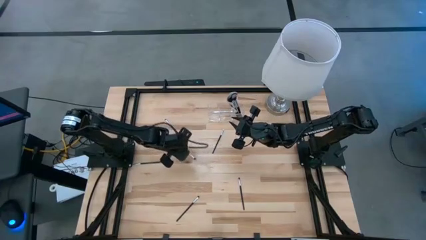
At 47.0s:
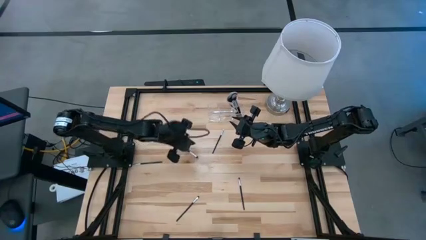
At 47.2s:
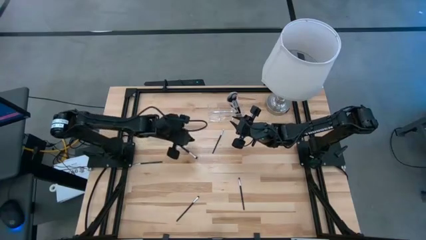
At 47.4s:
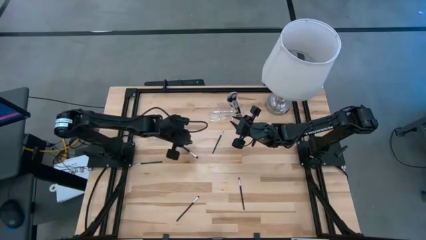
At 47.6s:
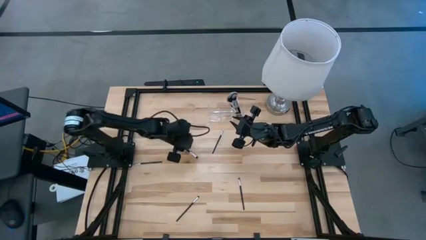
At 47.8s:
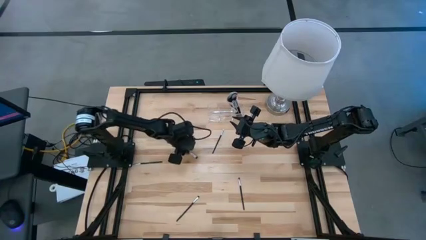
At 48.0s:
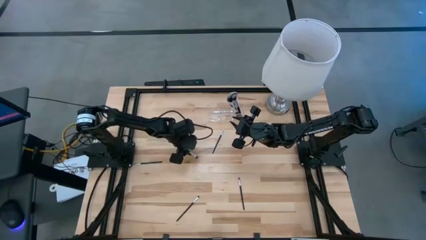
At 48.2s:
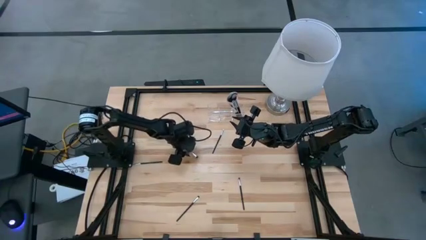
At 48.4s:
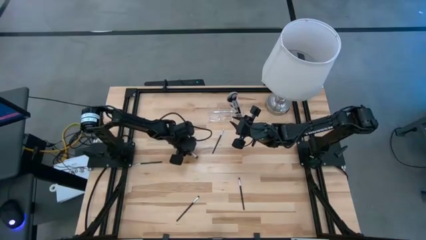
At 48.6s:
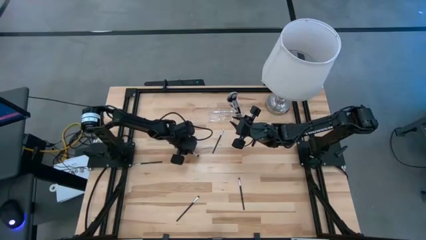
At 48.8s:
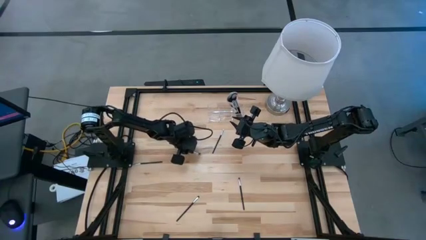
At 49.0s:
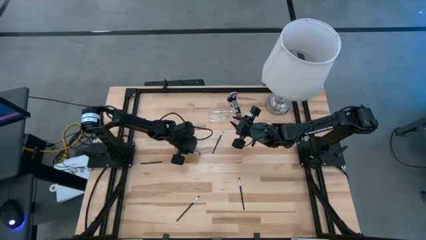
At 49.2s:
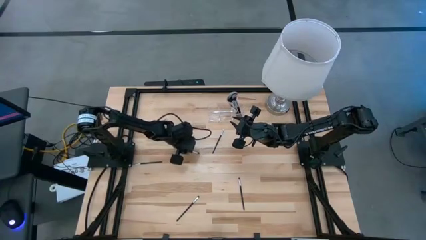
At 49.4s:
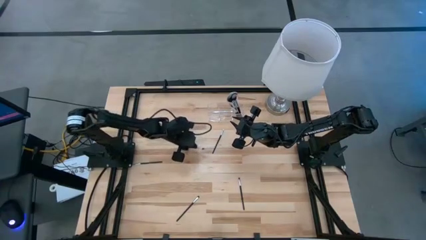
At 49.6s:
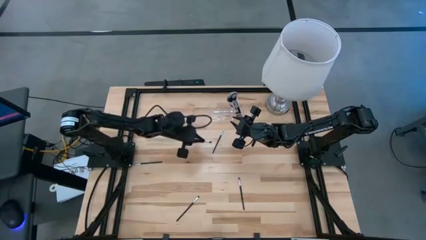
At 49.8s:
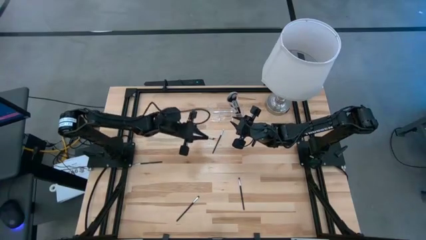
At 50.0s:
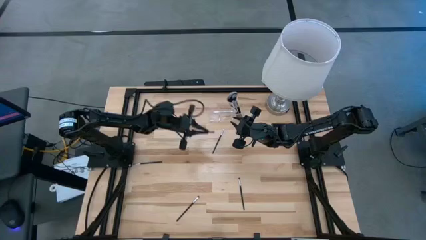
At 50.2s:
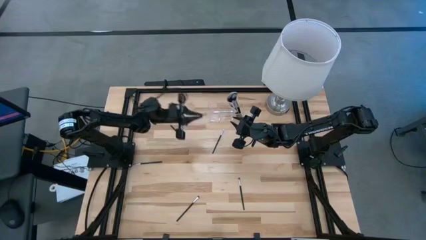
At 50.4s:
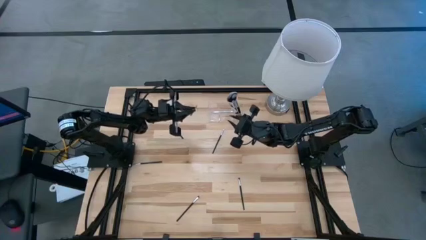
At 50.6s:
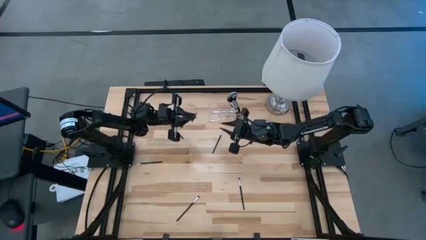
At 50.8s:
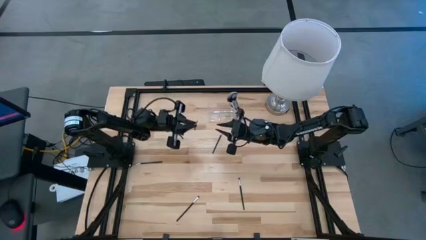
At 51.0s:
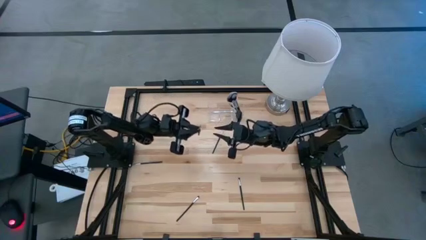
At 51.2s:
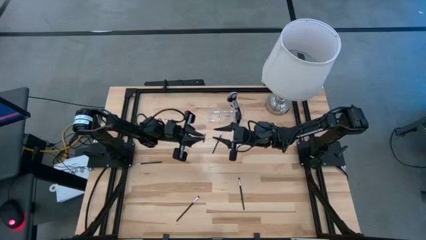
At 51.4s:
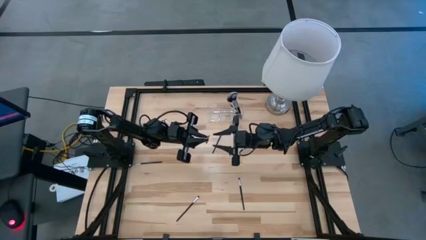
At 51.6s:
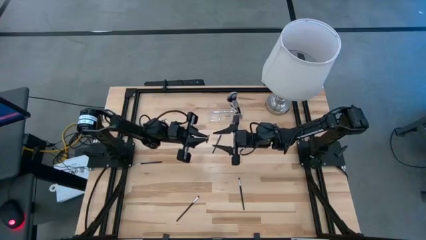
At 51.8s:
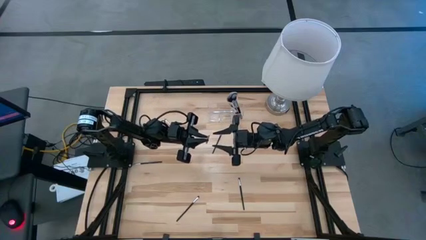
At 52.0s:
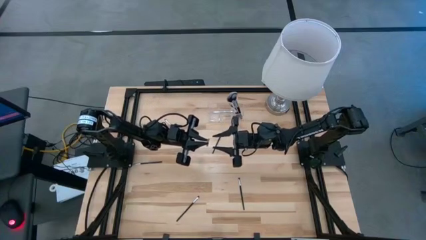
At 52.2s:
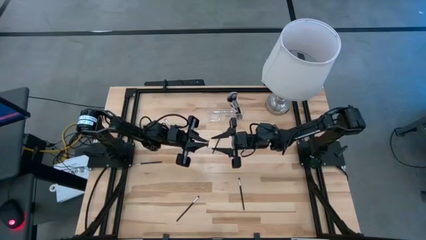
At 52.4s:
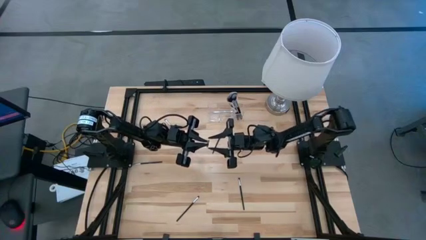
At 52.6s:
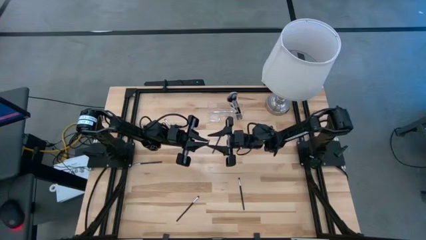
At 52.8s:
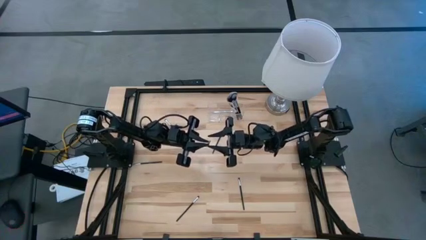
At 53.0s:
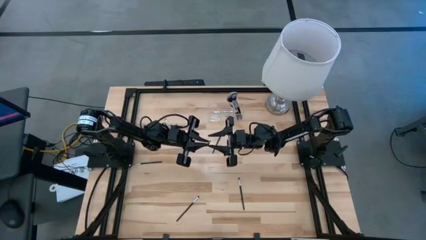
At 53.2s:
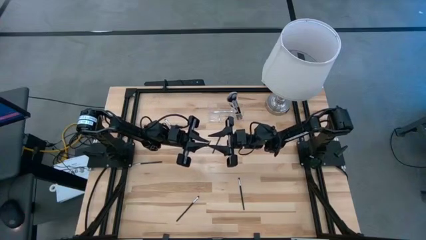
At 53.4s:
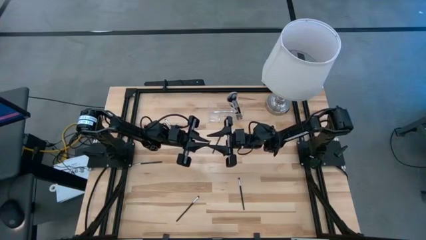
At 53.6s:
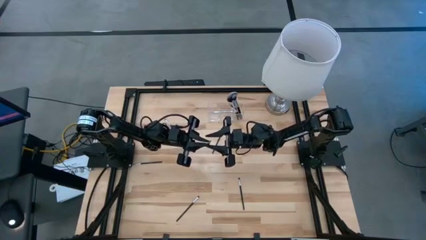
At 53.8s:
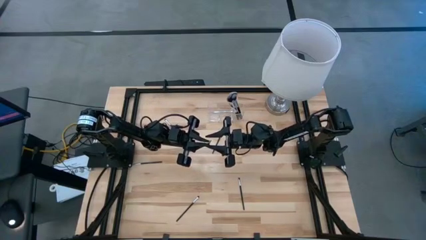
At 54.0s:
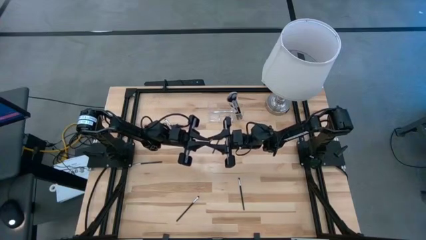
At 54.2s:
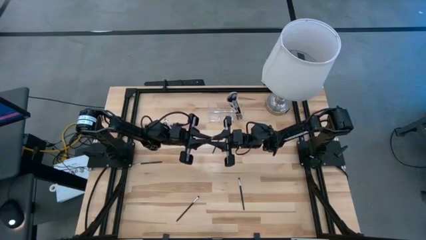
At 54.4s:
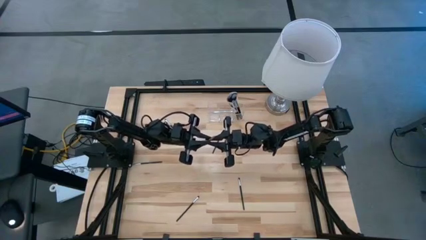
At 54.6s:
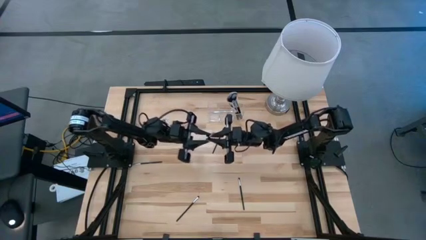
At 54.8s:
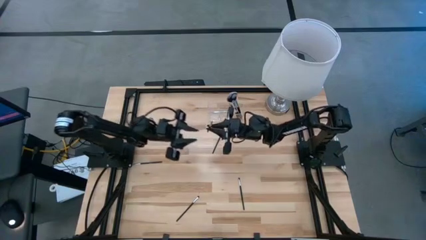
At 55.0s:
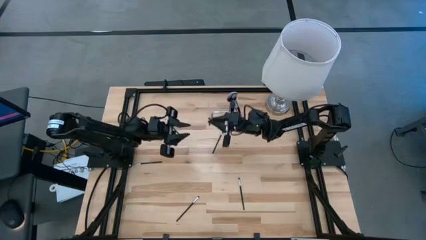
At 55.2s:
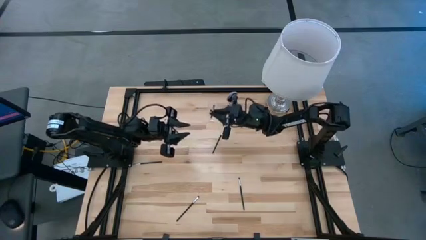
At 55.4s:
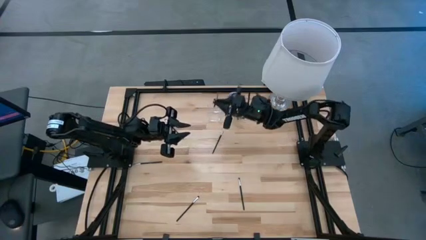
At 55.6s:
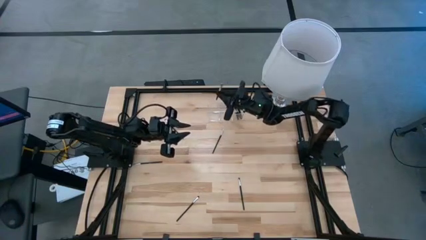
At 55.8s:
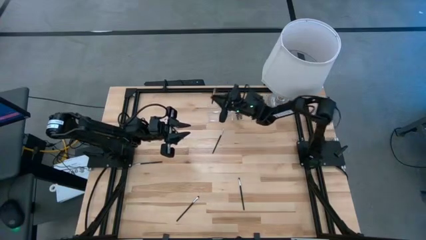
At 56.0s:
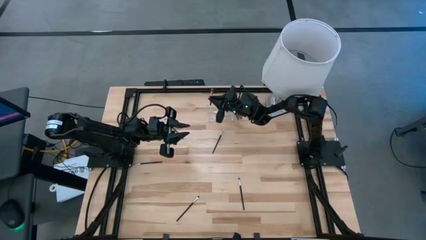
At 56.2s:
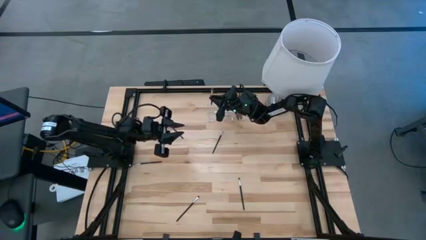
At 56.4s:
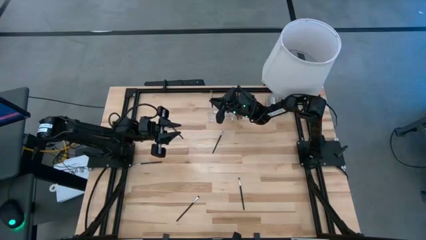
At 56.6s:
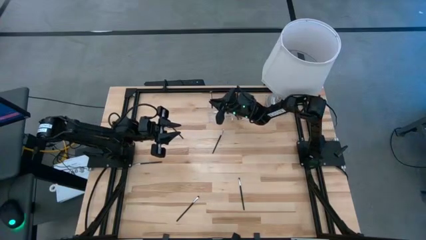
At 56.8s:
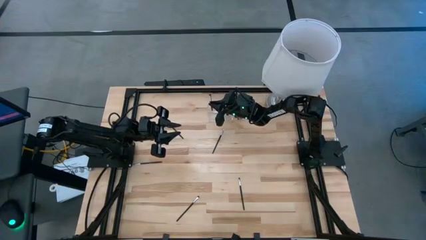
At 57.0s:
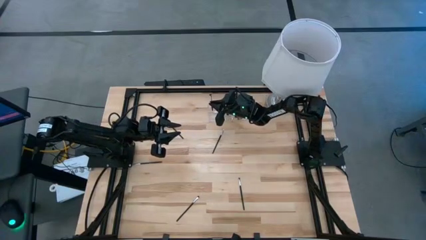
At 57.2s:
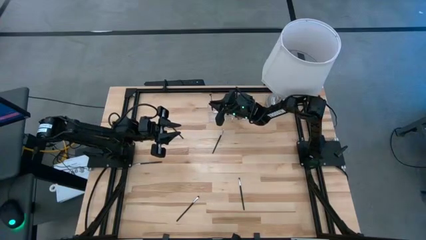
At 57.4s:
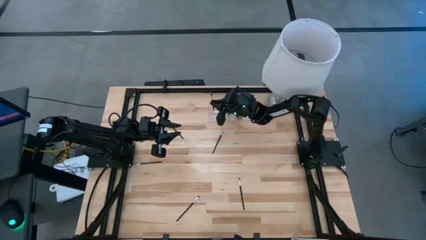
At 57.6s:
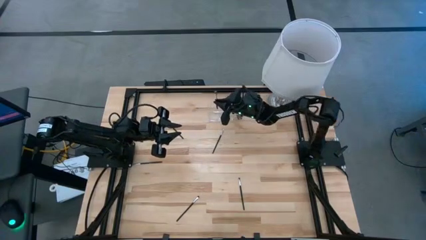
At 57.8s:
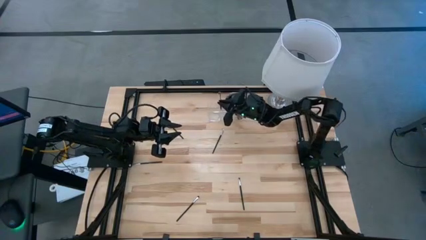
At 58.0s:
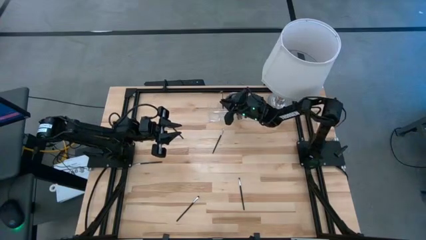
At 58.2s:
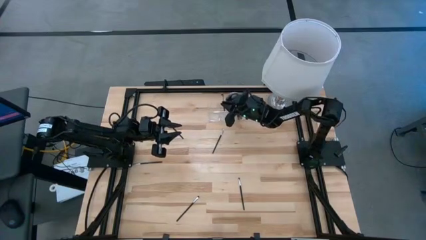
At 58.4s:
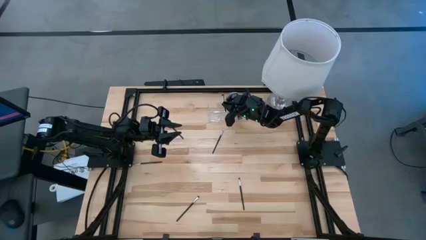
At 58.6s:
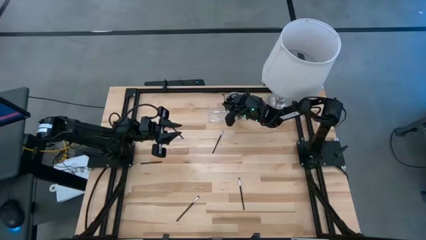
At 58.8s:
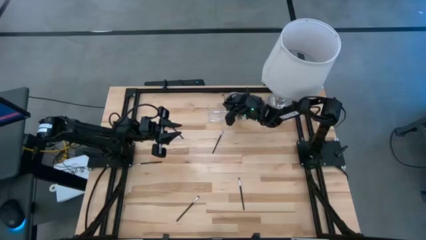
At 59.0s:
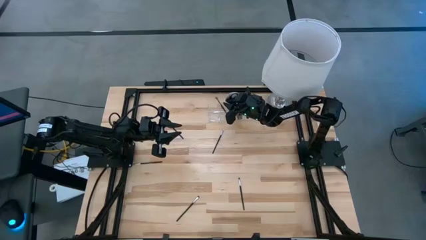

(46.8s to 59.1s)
Task: Put items in baskets/containers
Put the silver eyeshadow brush into the transparent organizer

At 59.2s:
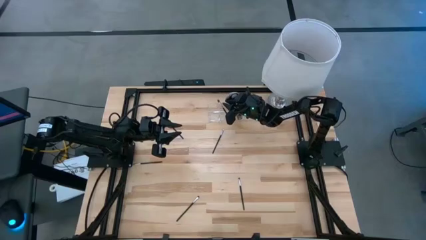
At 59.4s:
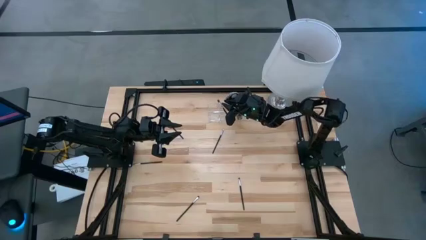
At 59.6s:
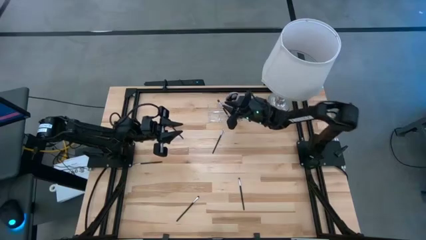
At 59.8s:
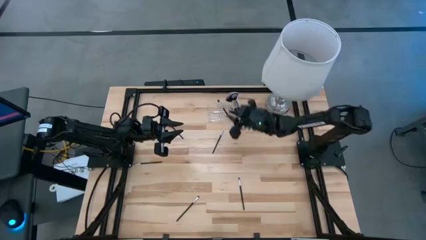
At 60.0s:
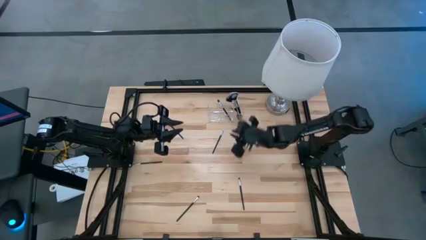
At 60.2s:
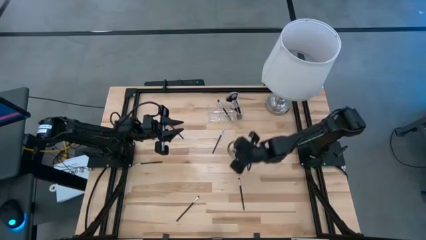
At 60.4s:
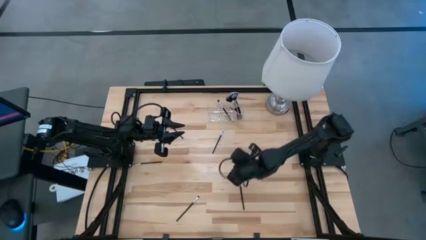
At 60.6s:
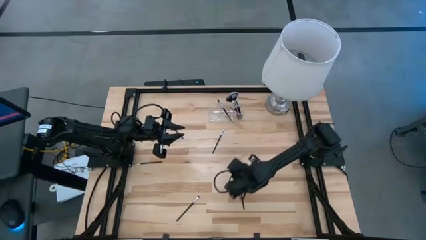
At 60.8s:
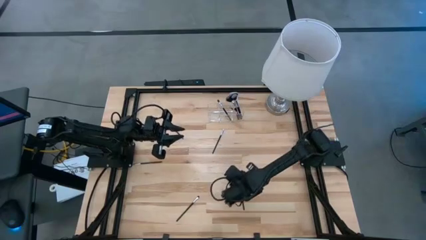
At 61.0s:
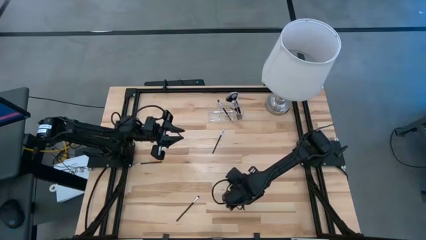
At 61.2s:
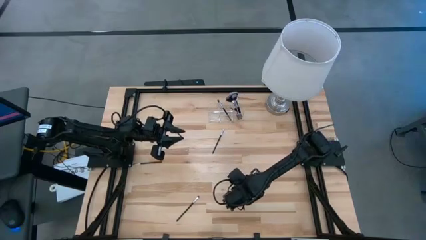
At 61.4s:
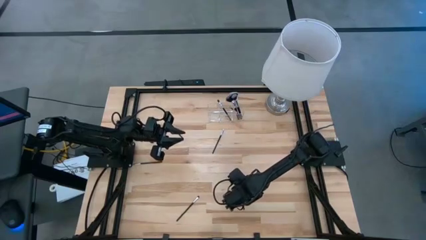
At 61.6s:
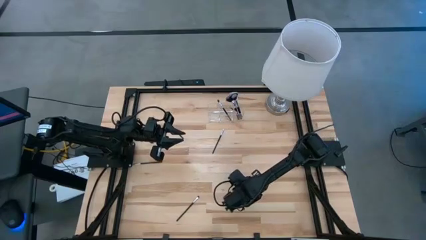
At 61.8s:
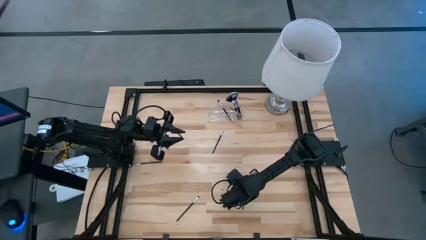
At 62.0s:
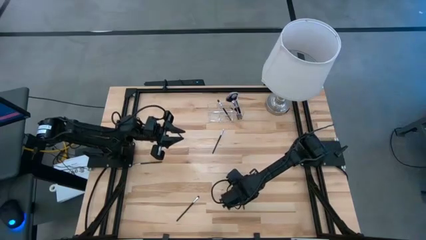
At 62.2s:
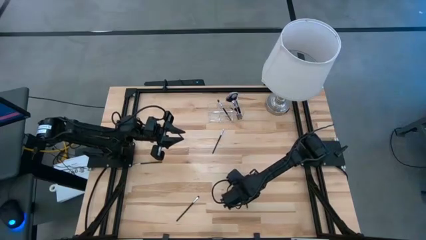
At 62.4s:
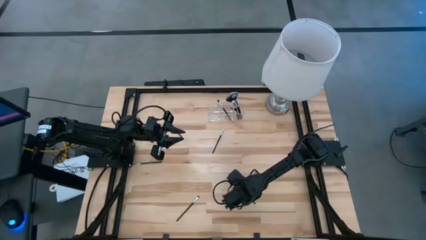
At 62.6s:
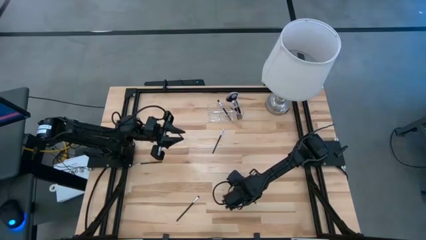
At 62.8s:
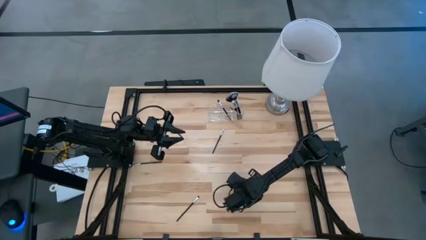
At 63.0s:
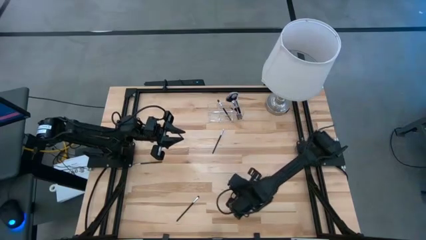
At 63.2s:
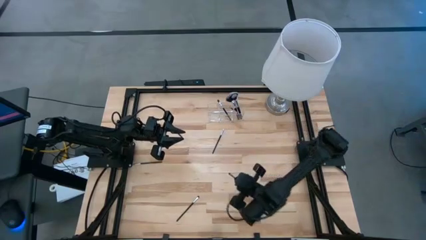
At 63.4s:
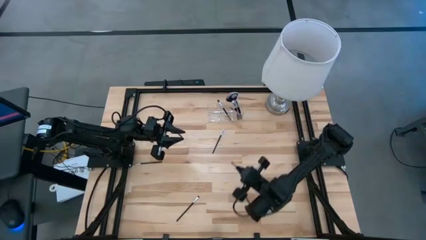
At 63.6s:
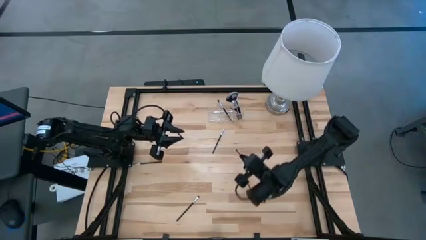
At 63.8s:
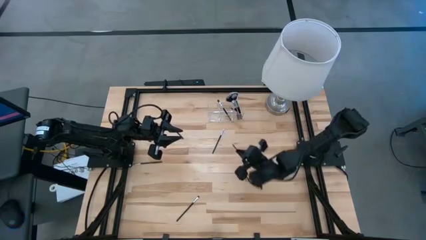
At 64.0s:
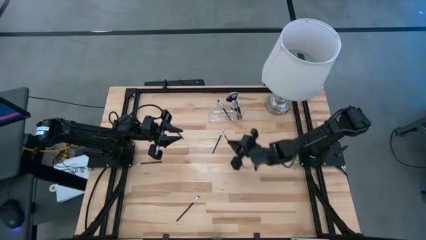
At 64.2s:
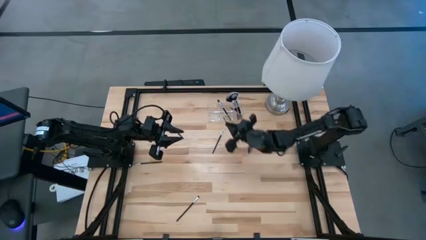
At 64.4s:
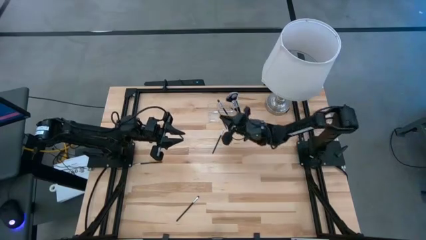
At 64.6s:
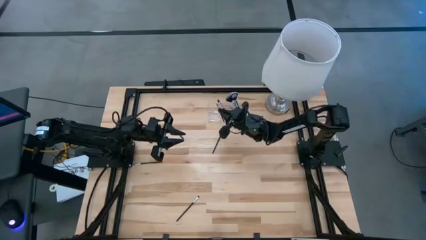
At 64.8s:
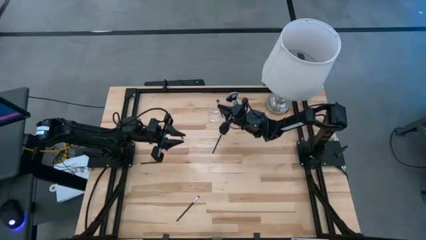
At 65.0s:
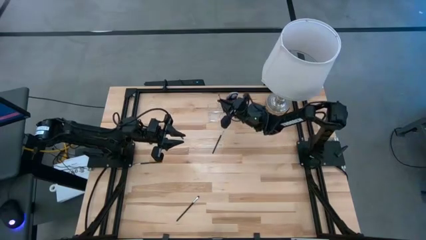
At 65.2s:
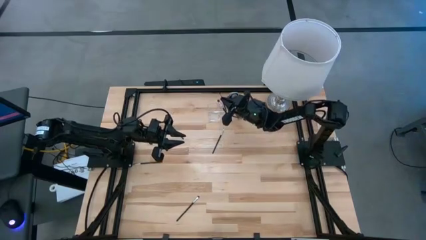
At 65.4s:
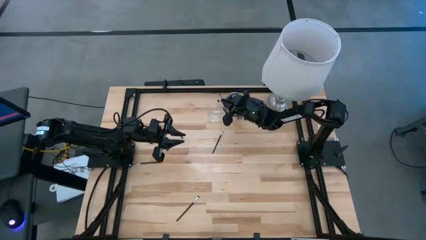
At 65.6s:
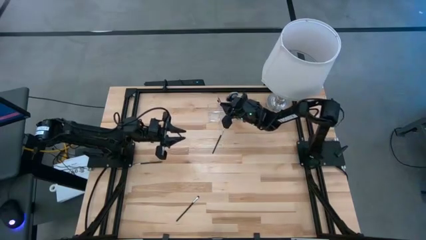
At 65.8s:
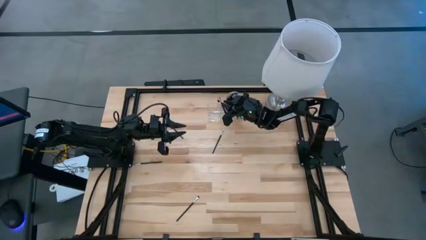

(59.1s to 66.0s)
Put the silver eyeshadow brush into the transparent organizer
